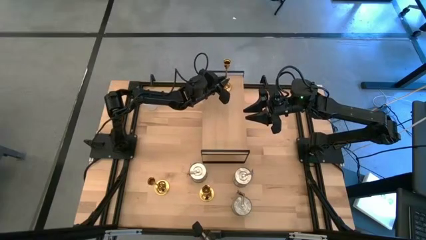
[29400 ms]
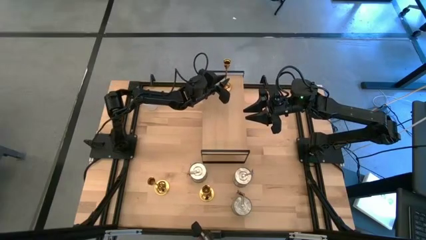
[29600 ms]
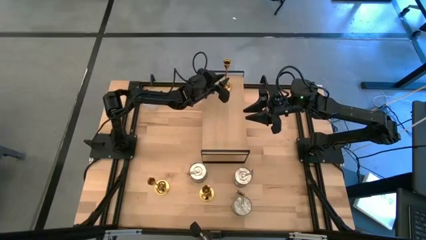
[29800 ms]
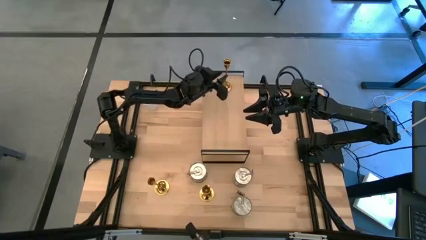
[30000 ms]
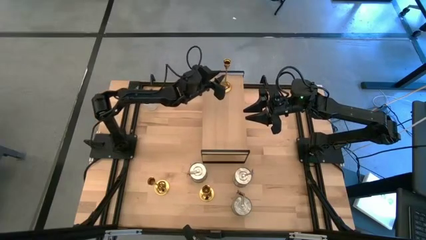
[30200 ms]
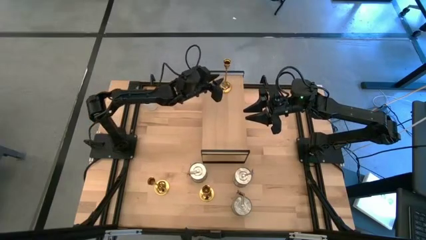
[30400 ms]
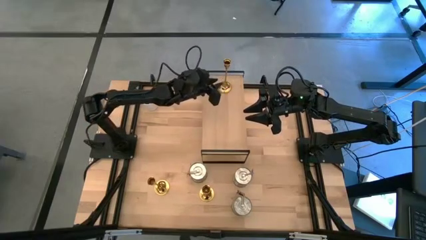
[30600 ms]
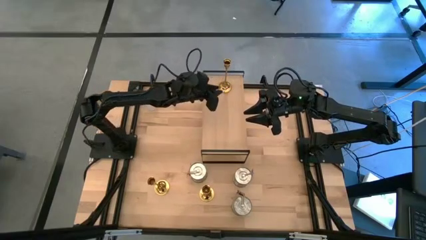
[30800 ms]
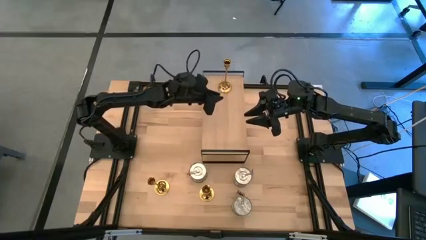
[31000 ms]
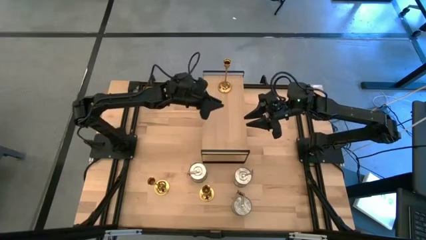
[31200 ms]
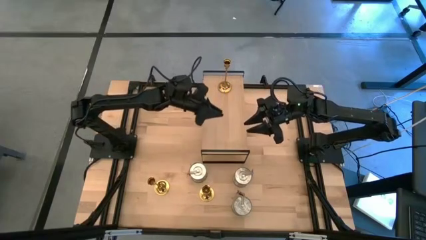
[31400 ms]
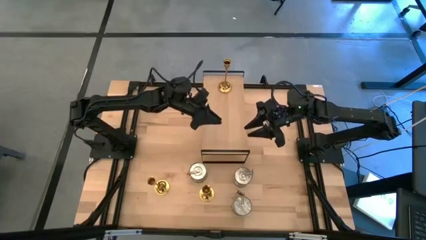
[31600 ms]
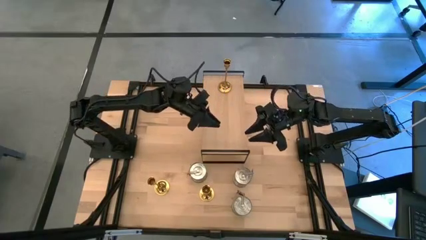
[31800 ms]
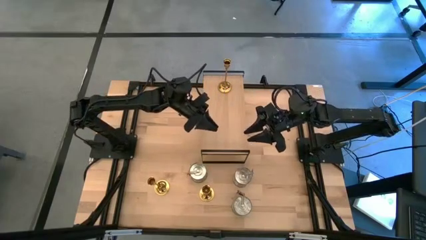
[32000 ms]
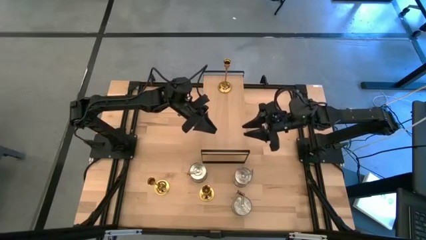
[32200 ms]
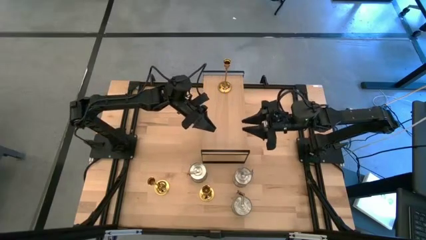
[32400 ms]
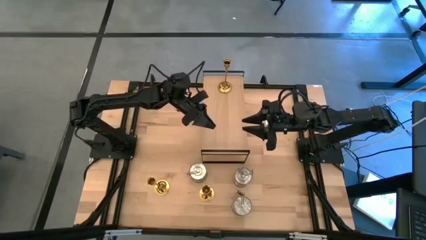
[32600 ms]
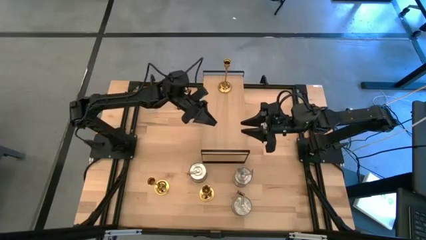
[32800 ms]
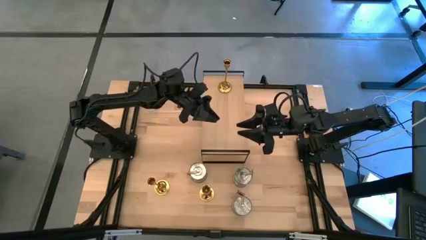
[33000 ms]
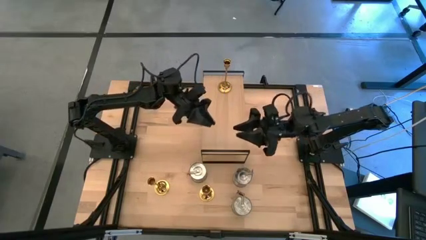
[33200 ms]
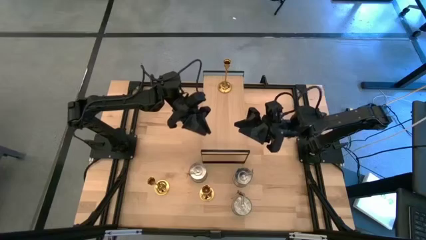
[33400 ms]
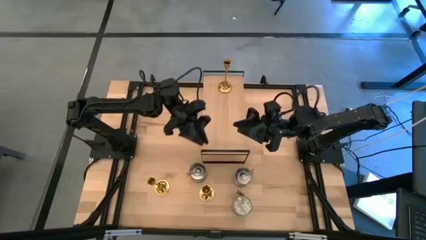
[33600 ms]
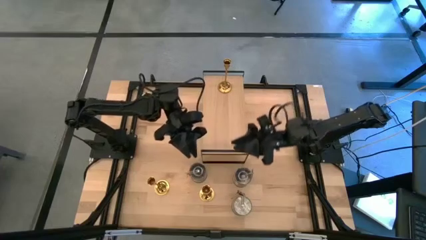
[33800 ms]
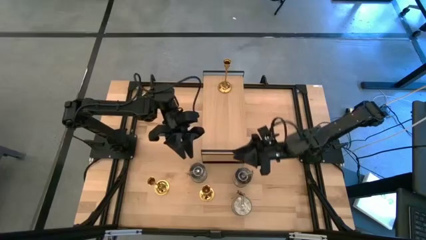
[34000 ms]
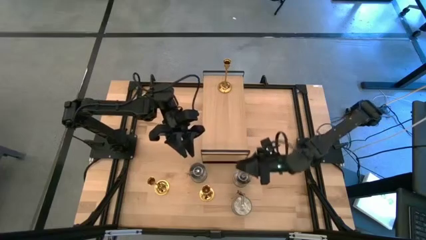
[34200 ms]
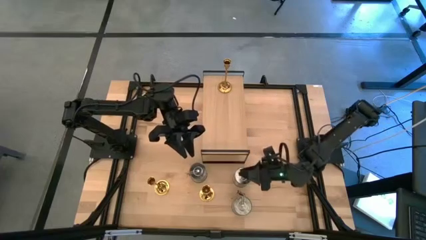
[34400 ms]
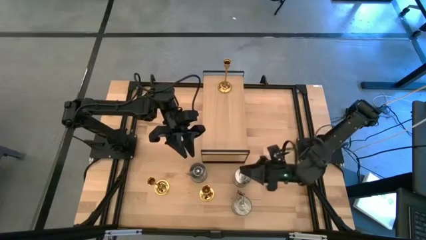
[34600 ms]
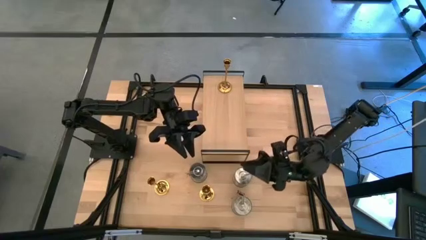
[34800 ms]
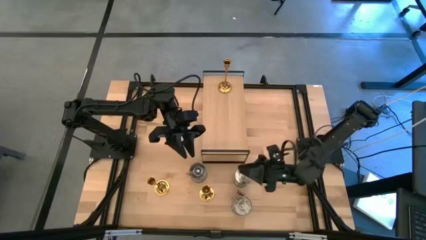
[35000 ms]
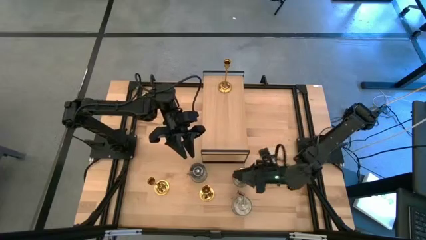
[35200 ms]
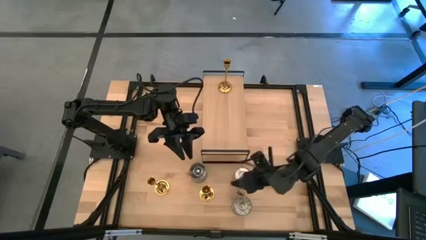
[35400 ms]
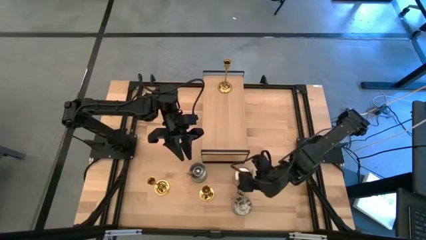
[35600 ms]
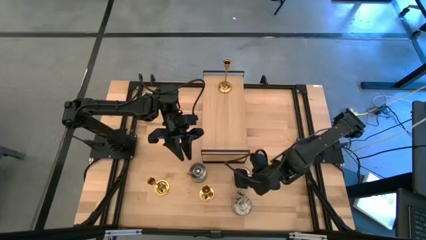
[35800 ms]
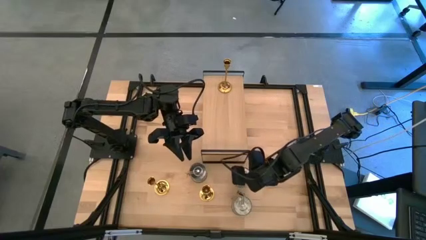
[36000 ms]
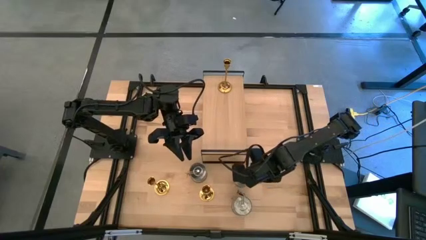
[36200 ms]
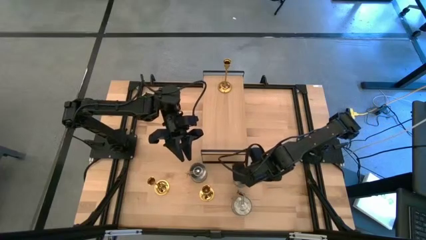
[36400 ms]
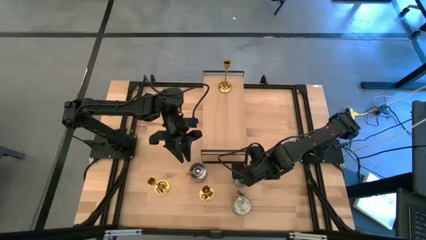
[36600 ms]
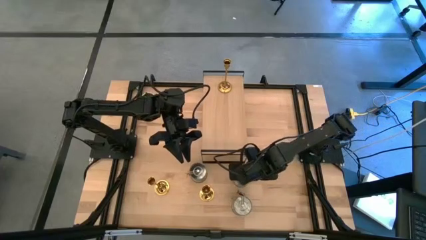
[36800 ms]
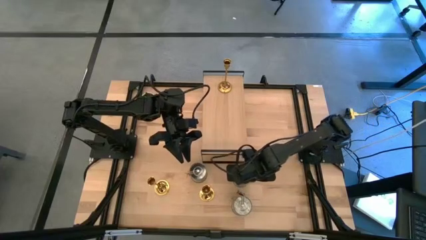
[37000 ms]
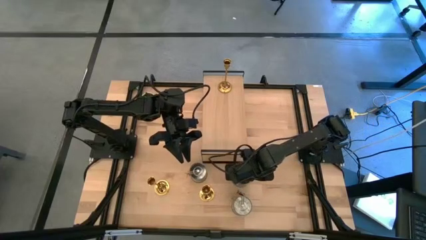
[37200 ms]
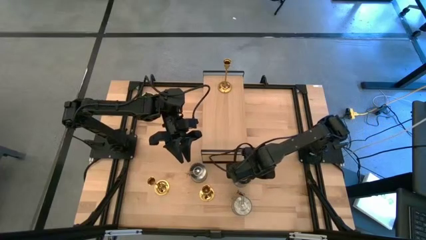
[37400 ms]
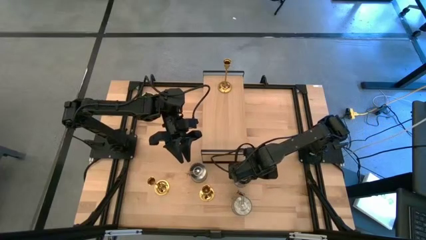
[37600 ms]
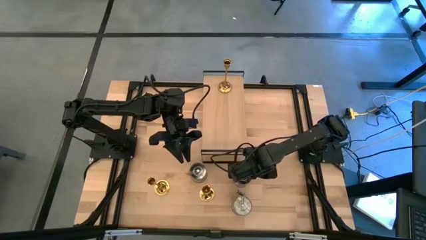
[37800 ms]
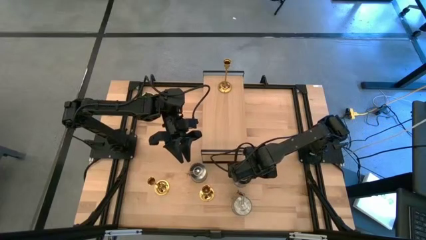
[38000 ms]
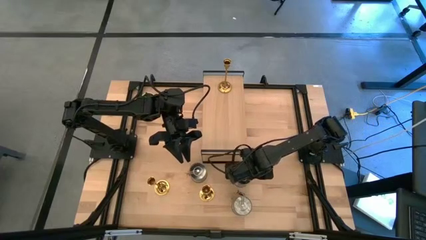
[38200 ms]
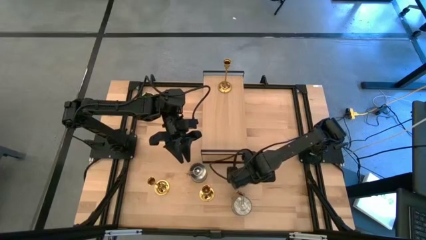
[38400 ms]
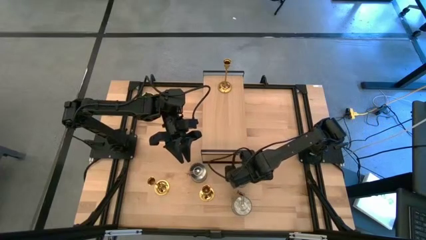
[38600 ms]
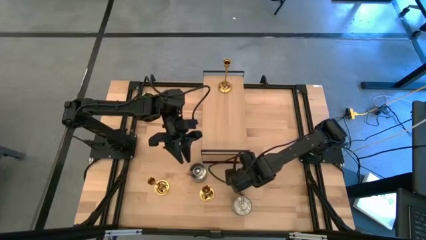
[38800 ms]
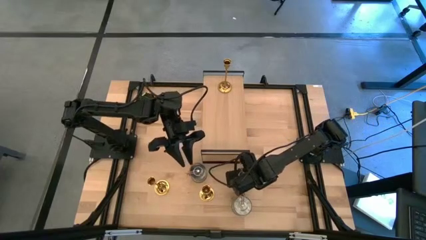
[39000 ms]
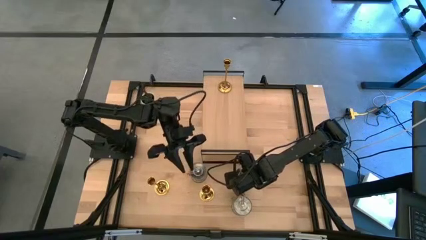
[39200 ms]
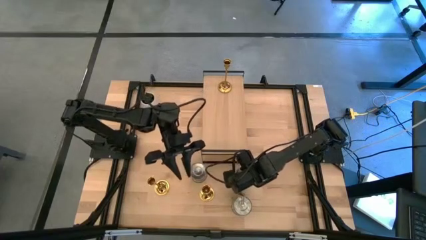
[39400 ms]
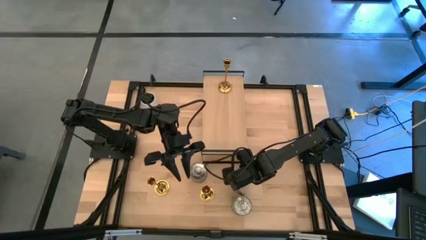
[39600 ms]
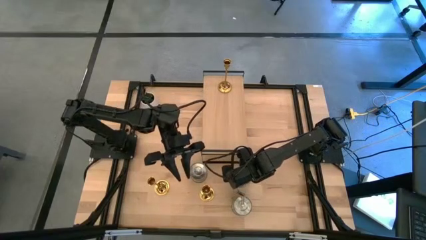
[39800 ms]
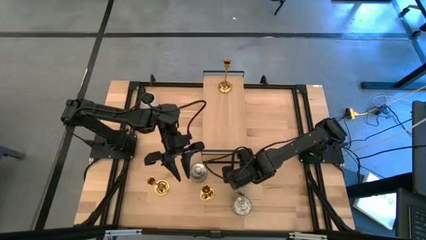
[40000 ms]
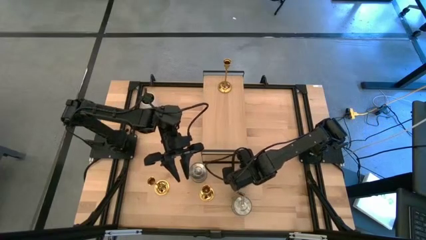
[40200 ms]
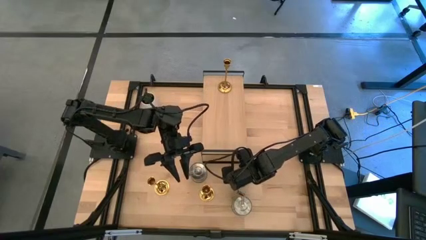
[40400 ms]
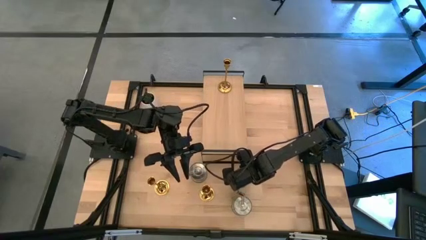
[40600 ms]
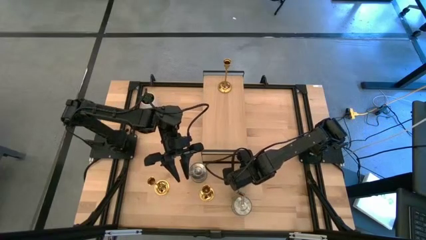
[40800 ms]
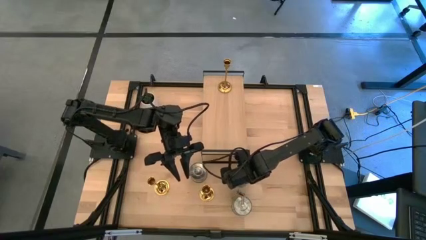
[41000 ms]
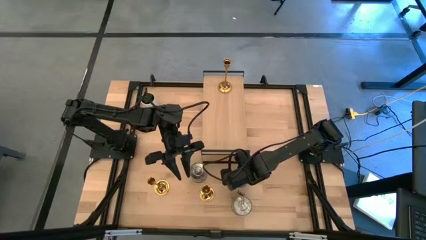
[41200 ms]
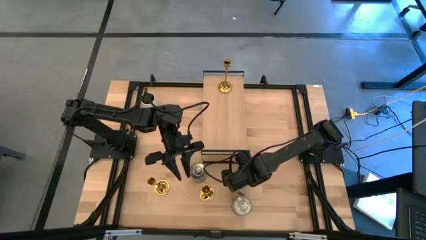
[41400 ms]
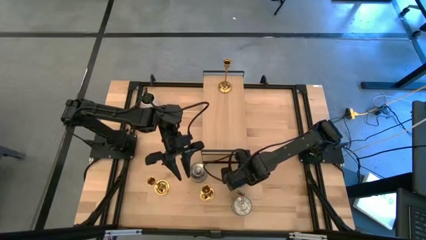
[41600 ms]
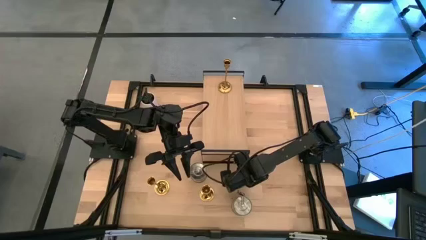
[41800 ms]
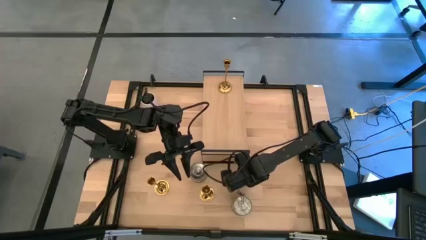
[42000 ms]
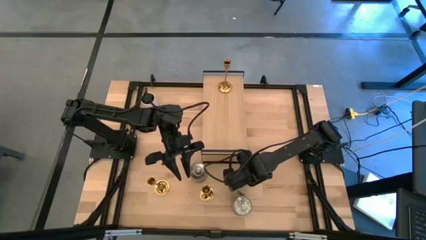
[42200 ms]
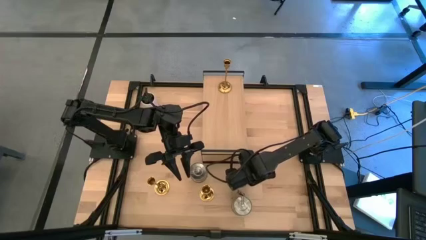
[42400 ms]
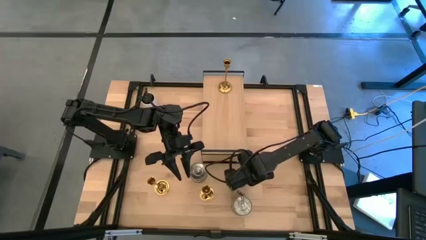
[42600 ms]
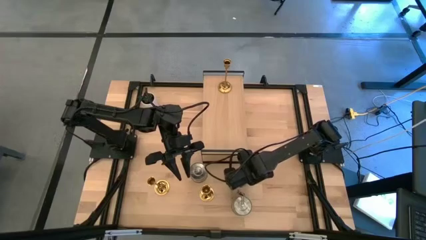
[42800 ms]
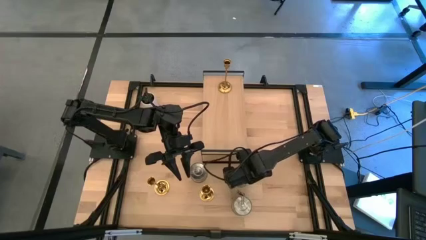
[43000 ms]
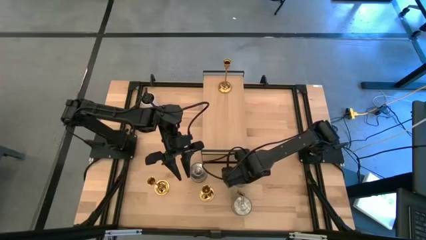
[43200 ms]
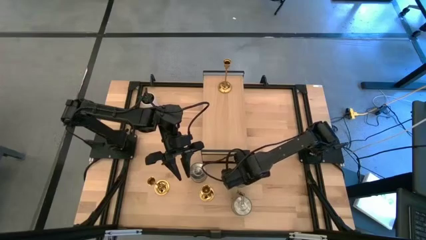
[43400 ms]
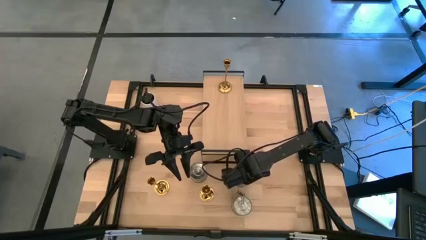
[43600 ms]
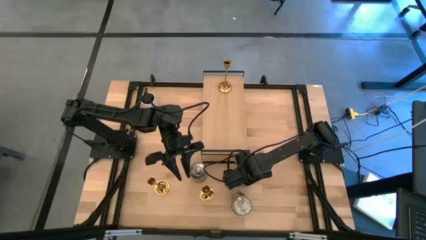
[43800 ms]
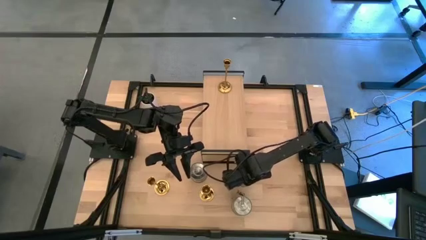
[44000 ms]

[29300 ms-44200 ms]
Task: Pick & Place candle stick holders
Put the top right silver scented candle on the shelf

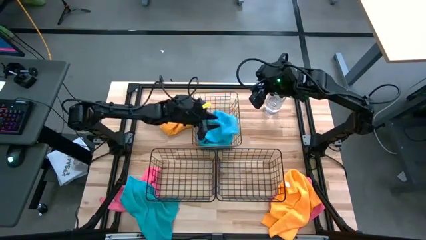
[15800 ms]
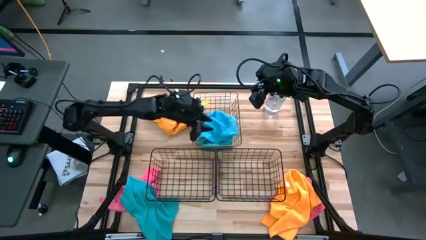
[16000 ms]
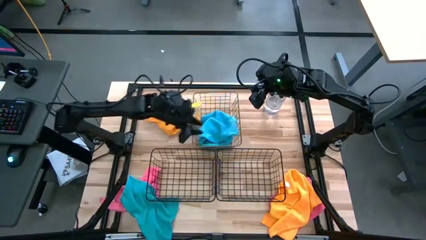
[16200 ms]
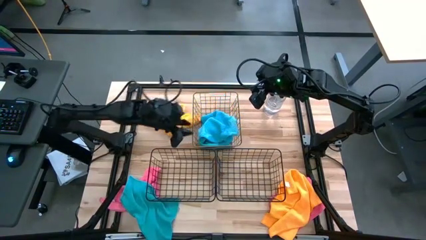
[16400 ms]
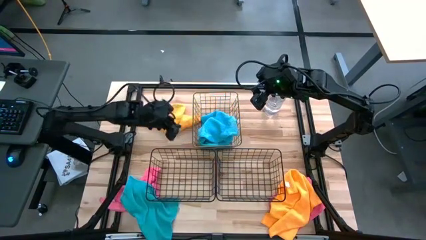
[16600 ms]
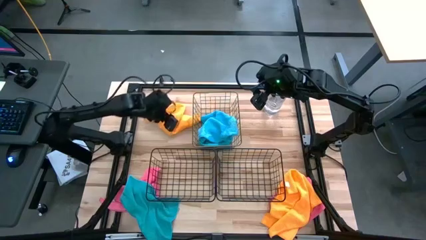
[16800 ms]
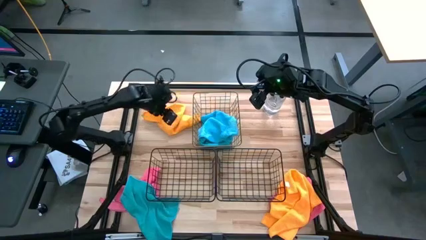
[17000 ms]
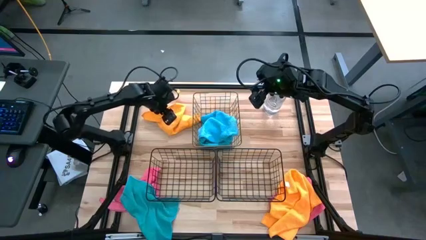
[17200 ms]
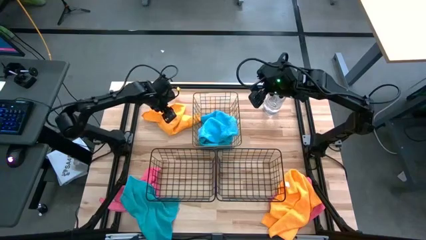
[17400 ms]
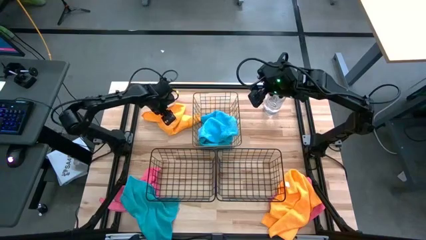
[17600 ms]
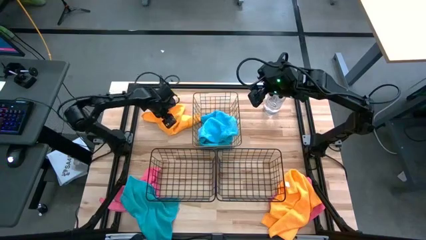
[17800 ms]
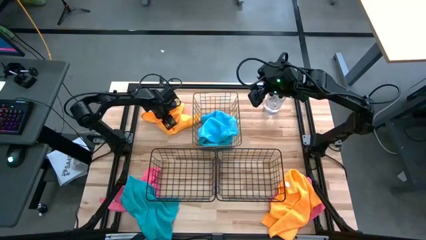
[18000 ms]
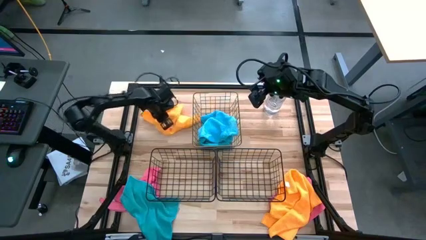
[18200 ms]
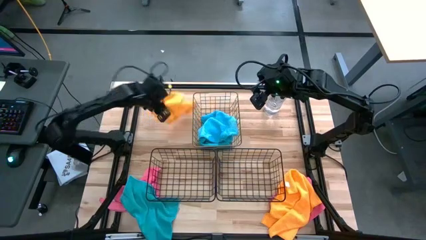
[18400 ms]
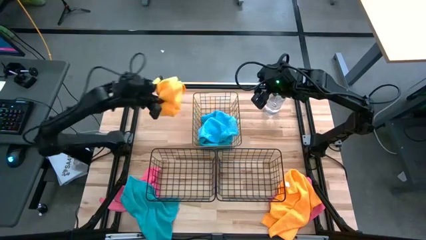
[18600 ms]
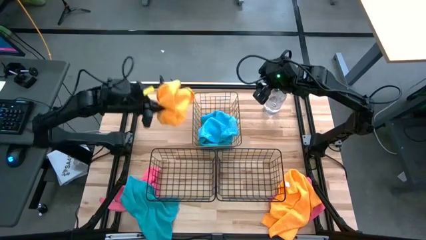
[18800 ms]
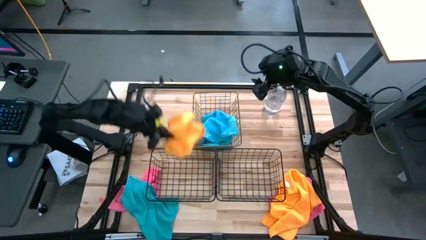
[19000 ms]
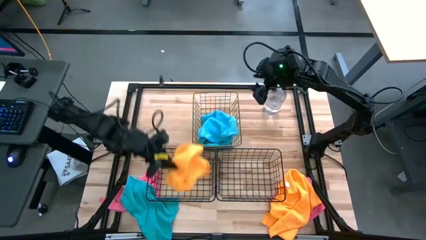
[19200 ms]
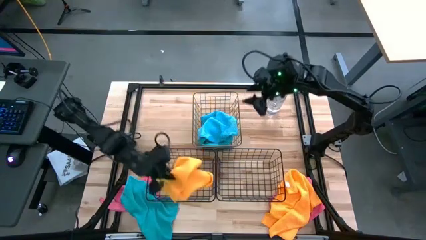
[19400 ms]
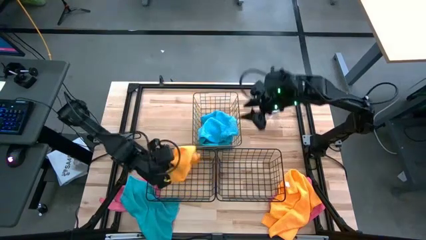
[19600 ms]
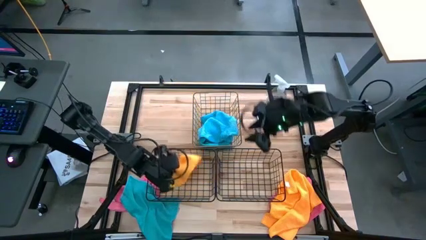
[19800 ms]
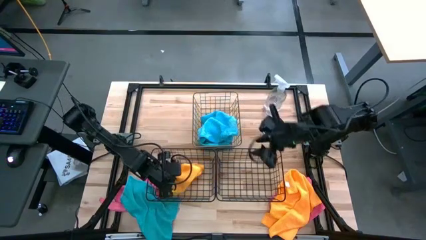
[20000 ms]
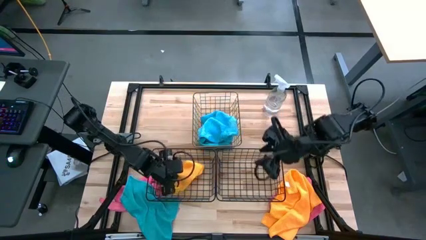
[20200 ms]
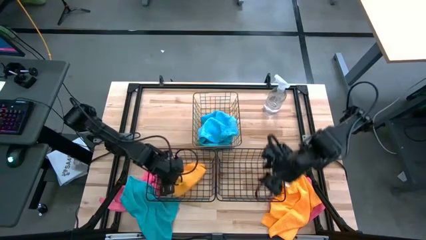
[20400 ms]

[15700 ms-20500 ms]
Task: Sort microfiber towel by color & place in baskets
Put the yellow towel into the bottom left basket
